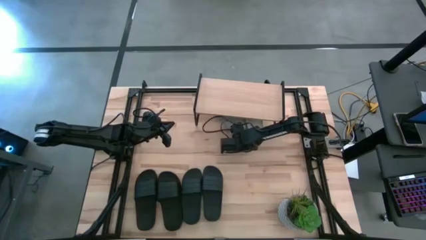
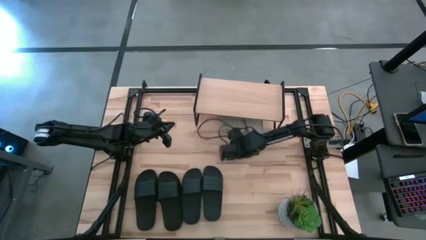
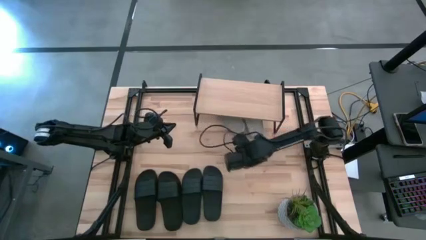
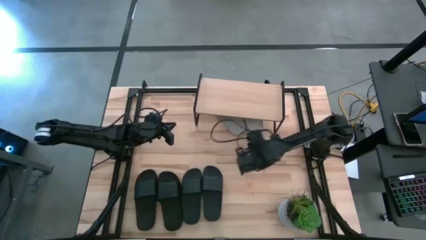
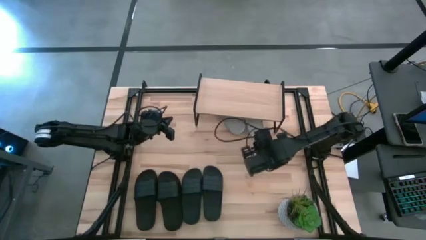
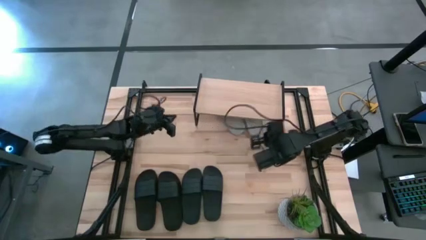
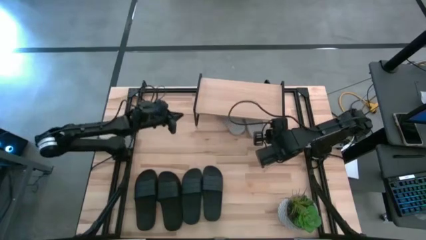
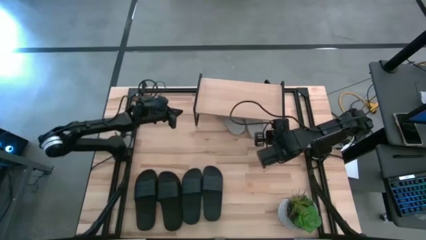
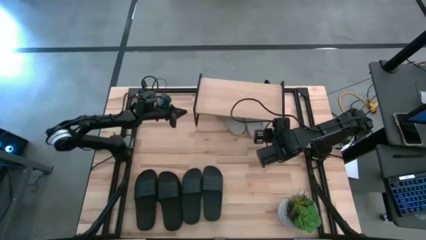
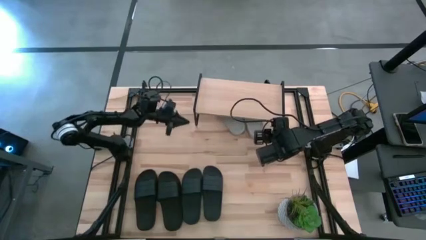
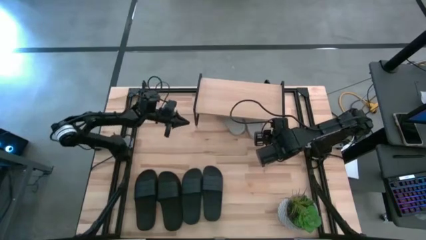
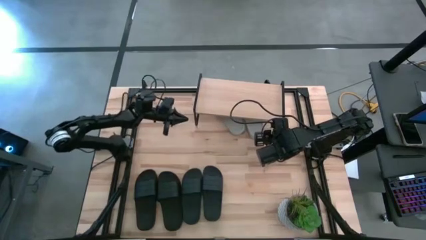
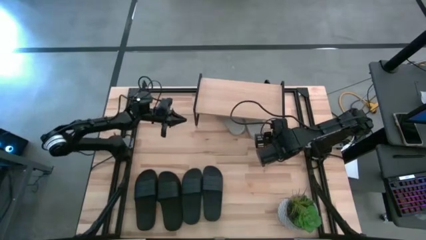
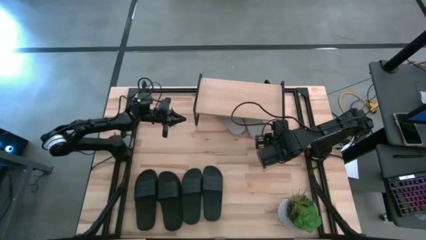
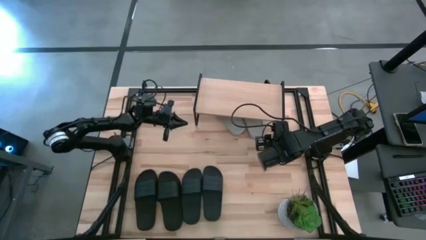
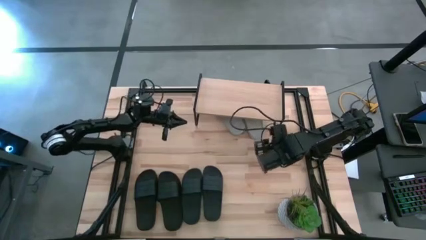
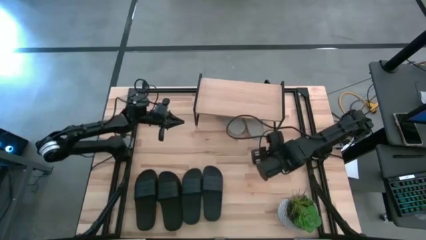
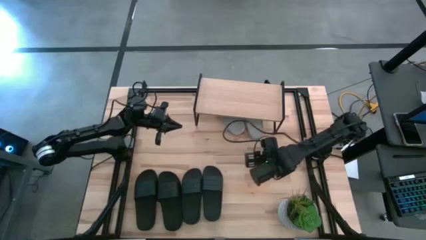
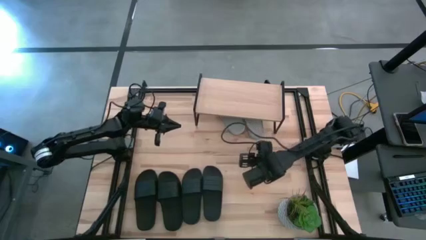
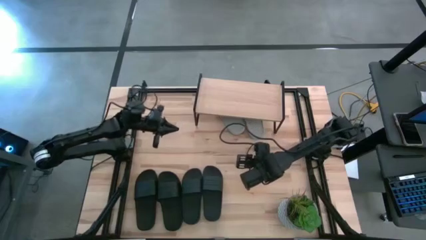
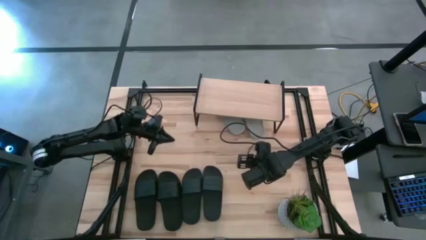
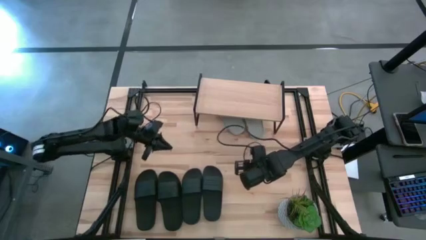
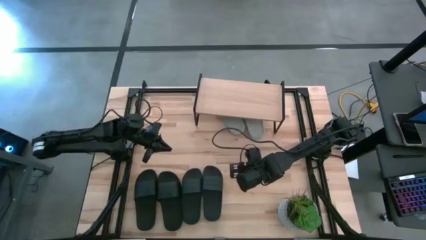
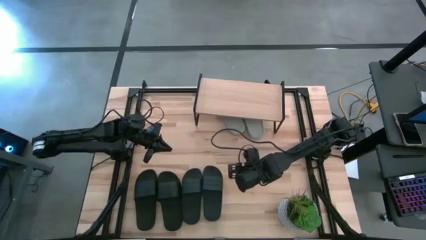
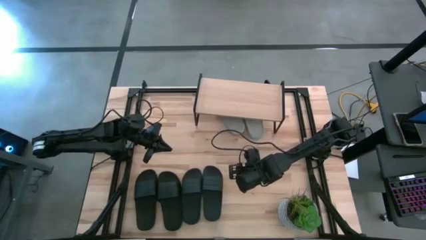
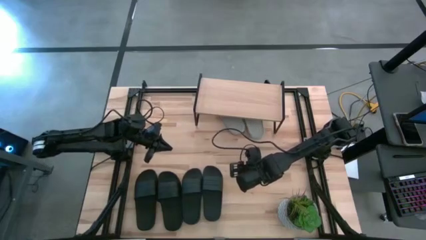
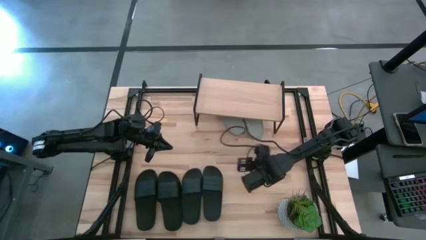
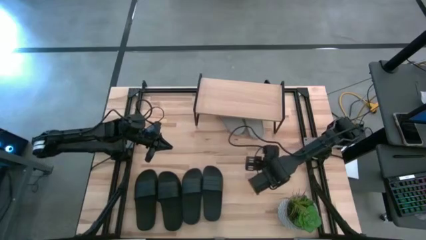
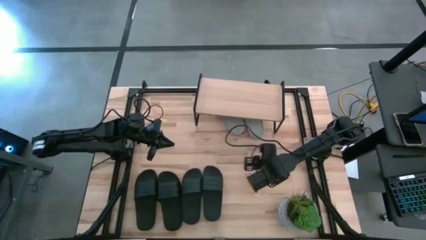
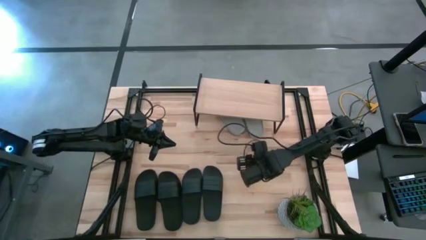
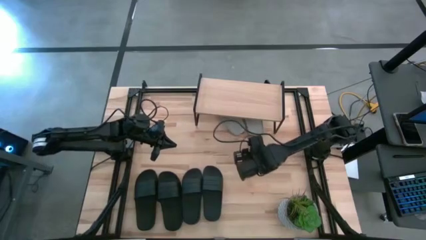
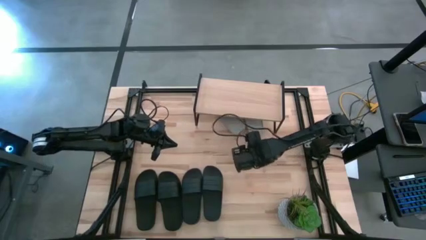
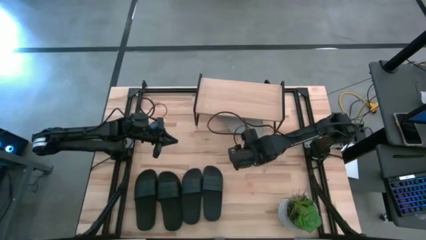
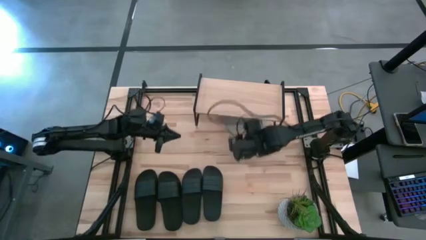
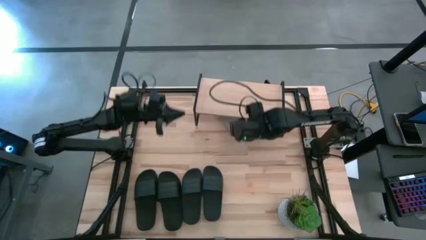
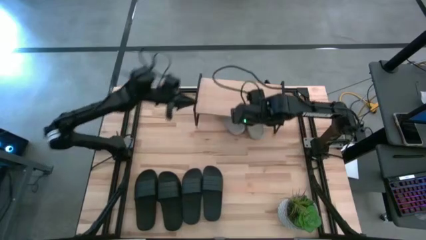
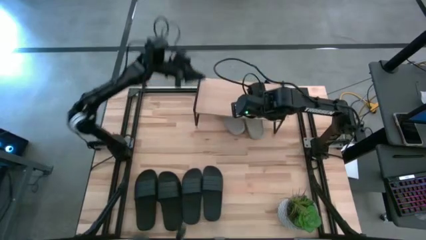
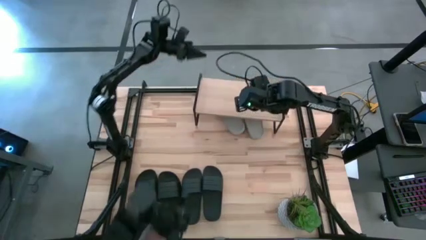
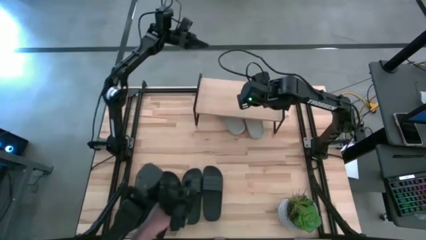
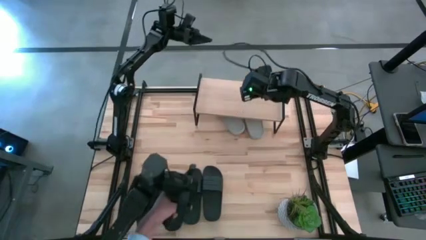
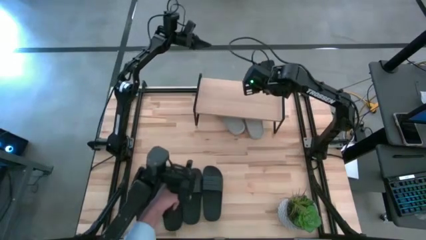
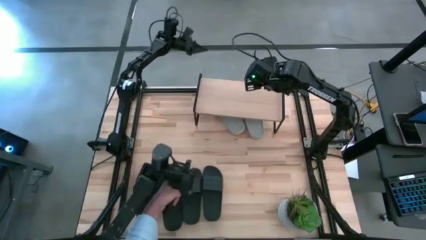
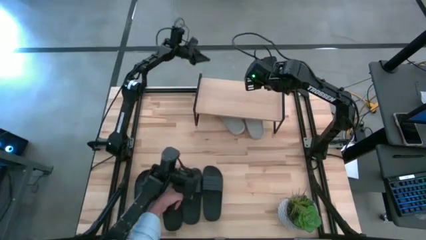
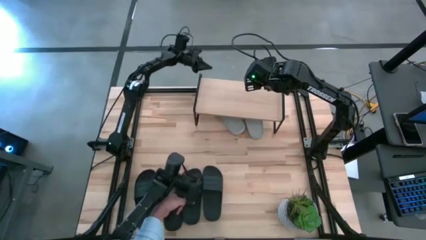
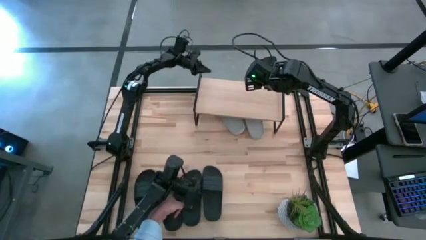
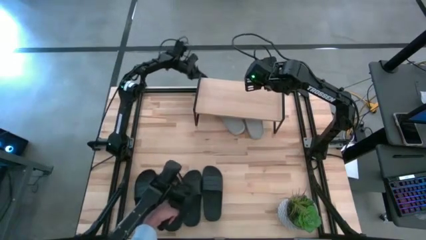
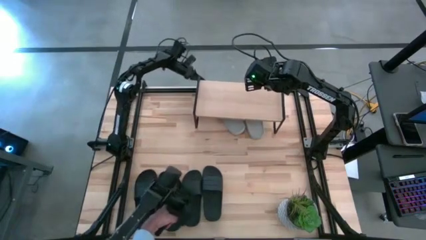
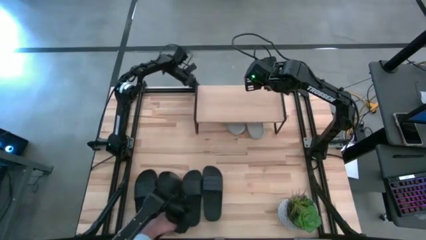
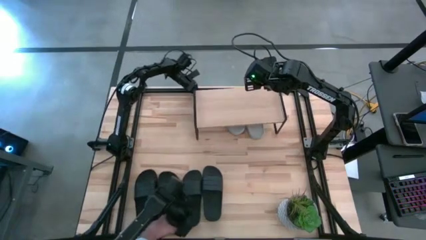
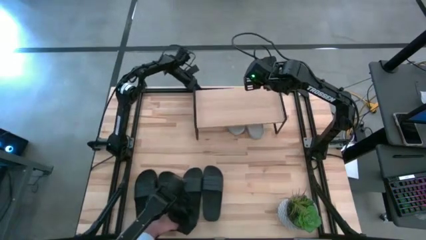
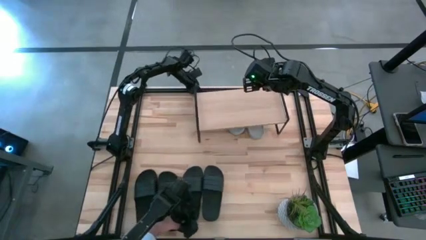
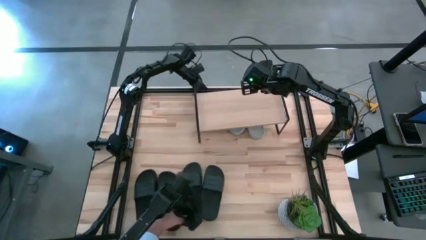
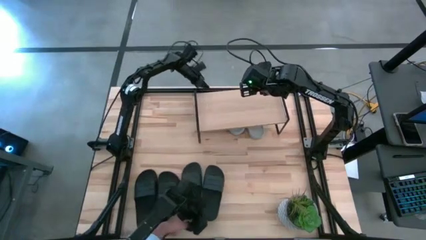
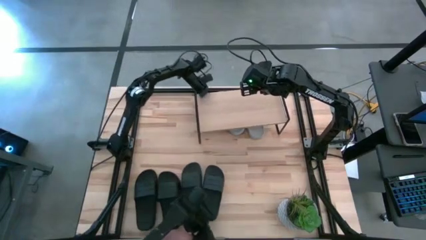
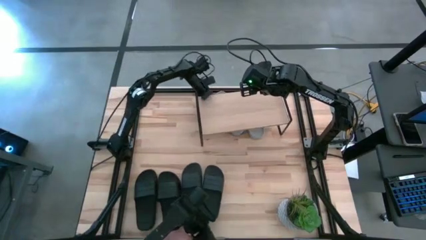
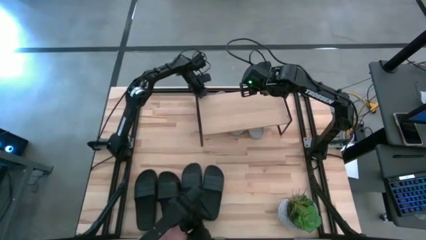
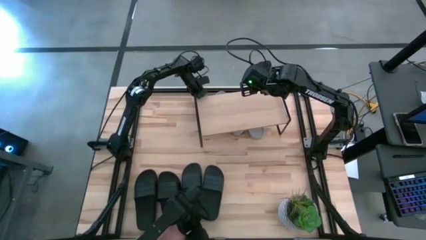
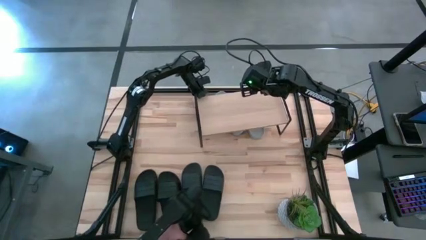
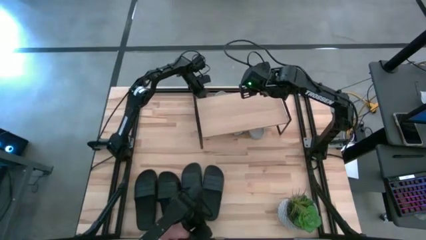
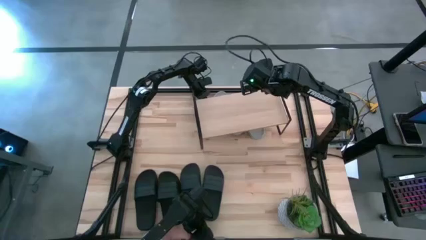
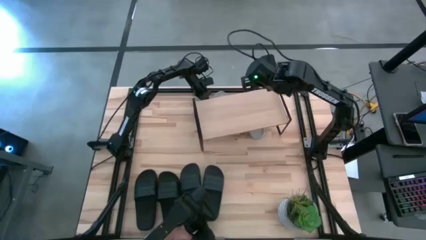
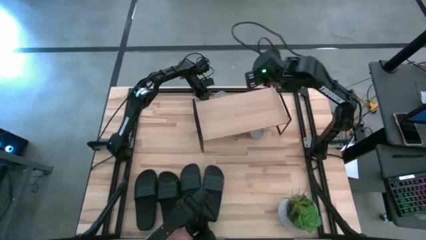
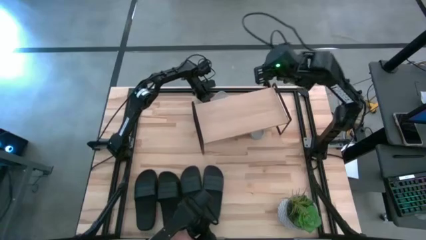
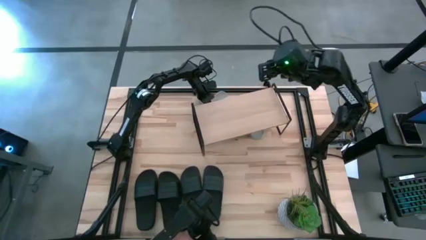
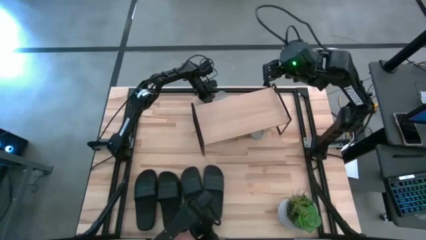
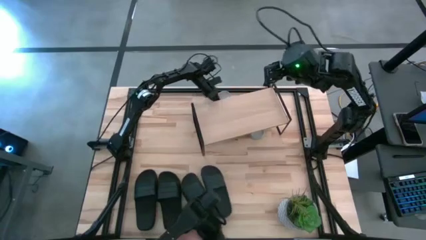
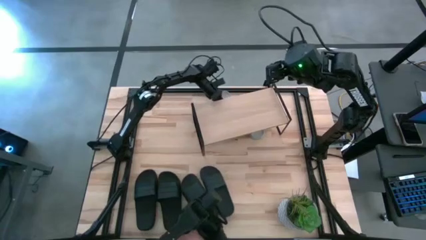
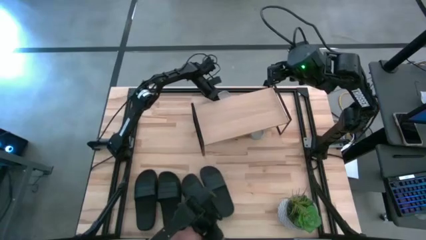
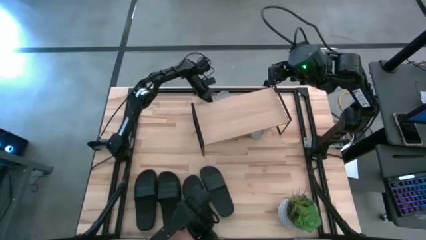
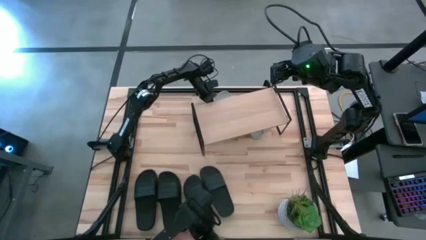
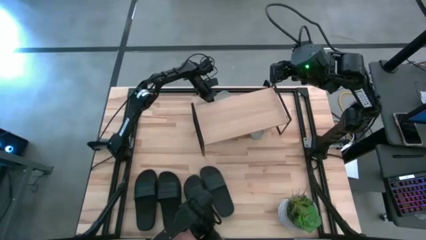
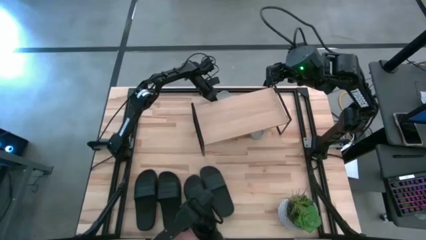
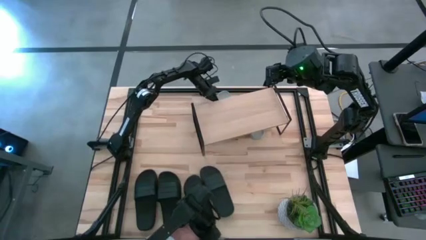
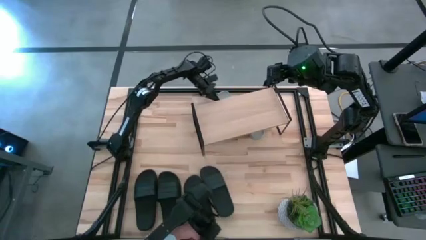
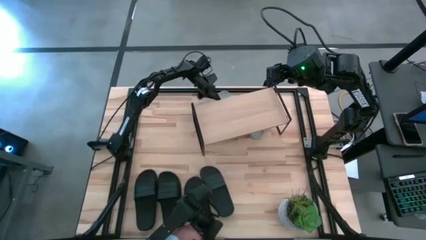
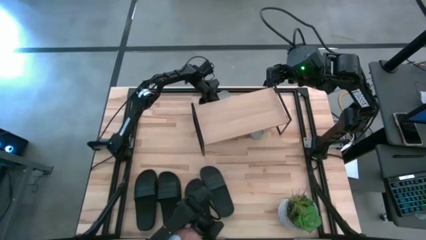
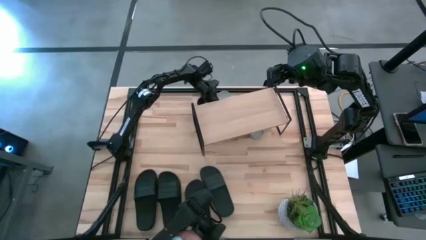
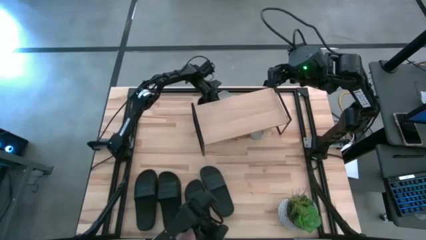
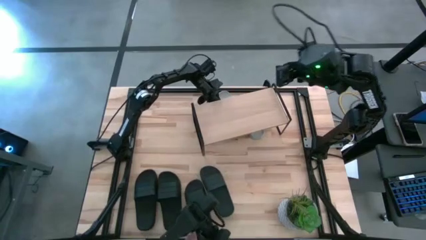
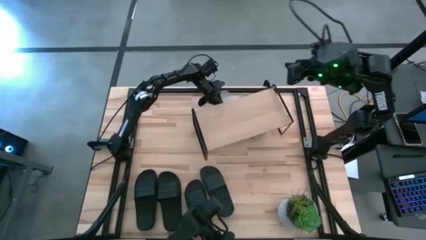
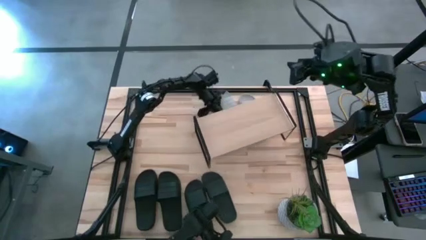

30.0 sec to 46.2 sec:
Task: Pick and place slides into the shelf
Adjust the shelf on the table
